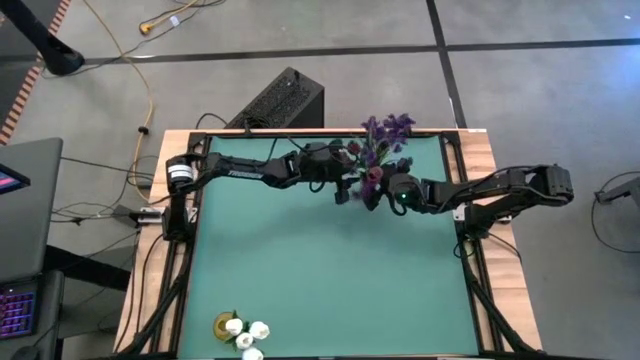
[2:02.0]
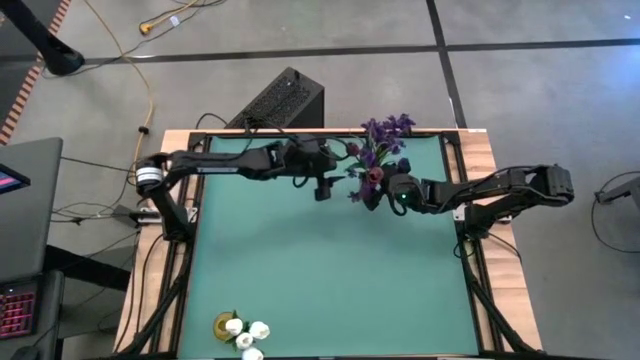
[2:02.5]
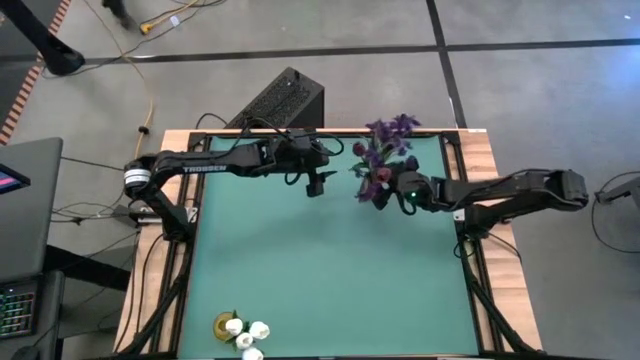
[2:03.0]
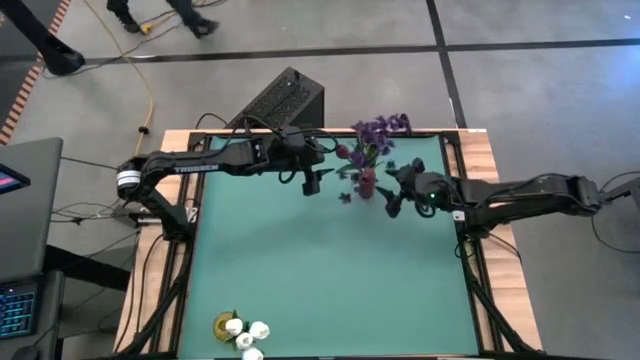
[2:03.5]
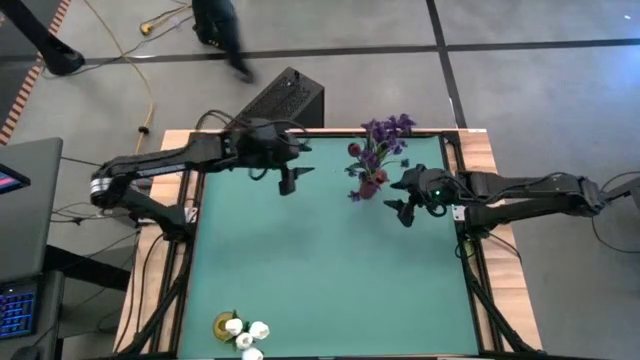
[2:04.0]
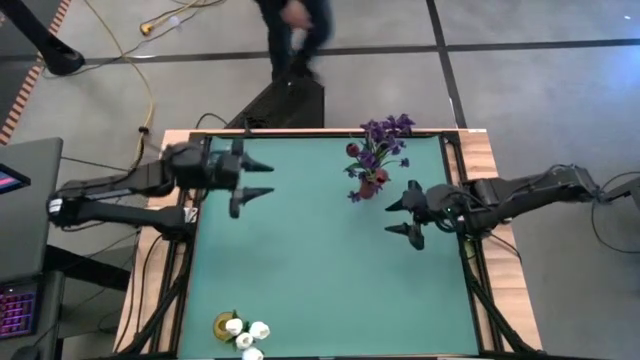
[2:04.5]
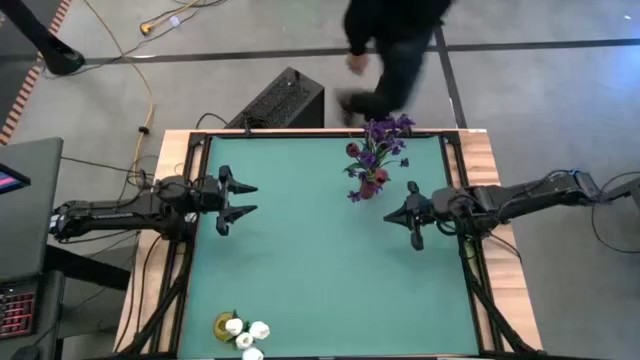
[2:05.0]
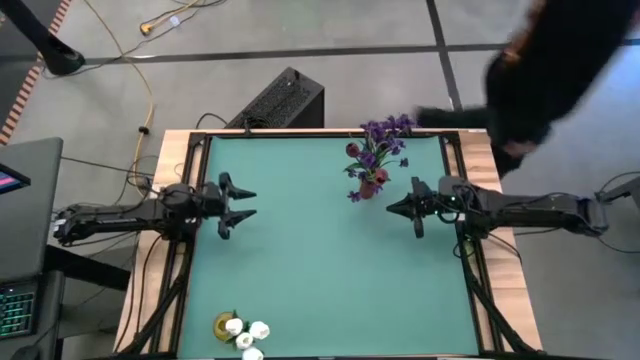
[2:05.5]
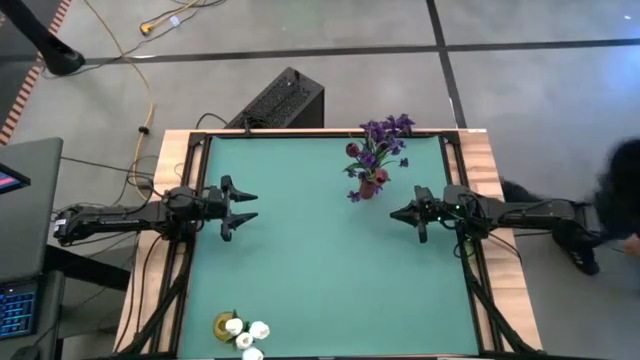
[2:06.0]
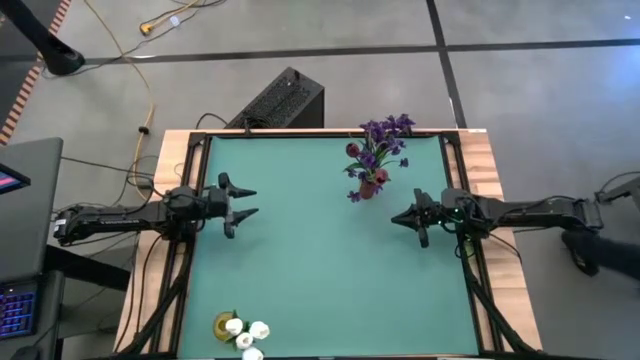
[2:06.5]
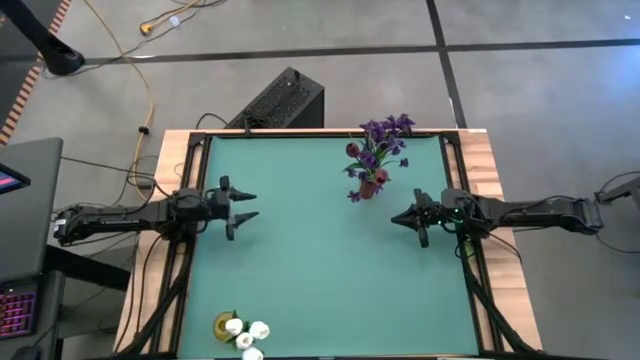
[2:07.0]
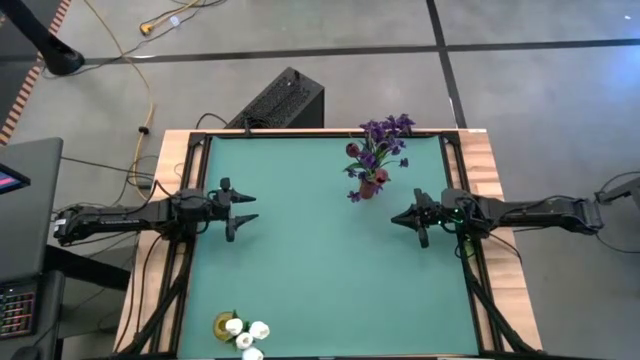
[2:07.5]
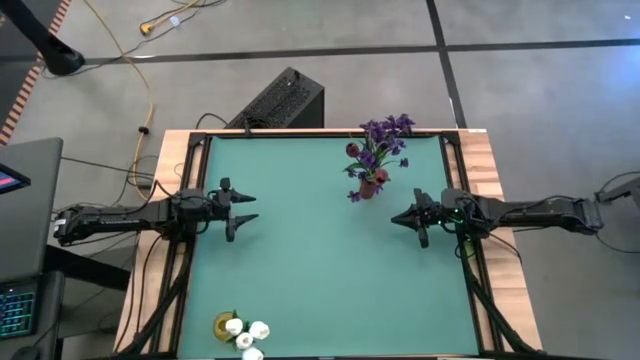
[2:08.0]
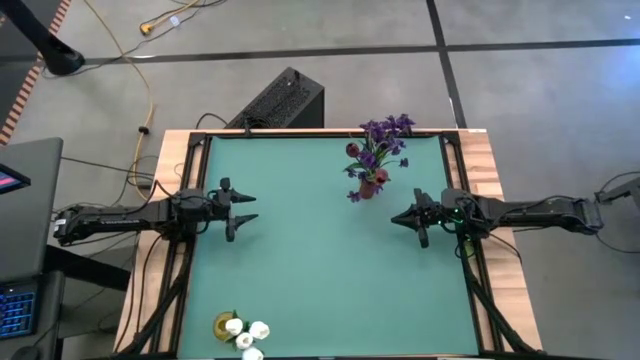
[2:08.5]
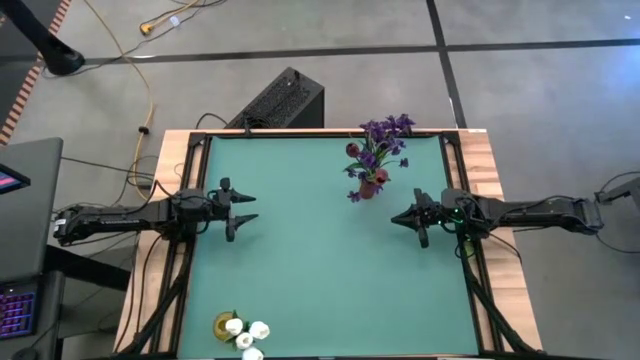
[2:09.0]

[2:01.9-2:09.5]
Task: Sort flowers into vase by color
Return to Home Position

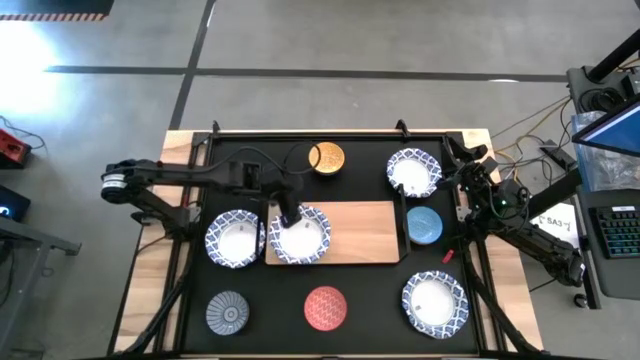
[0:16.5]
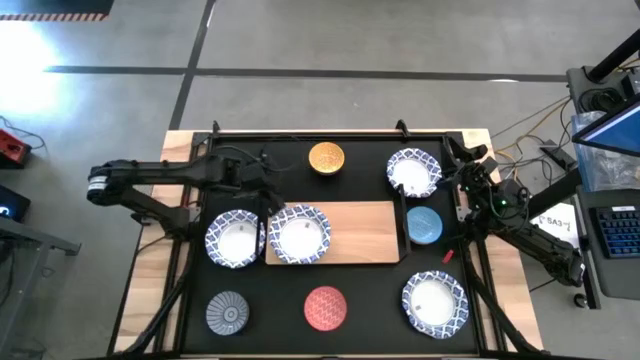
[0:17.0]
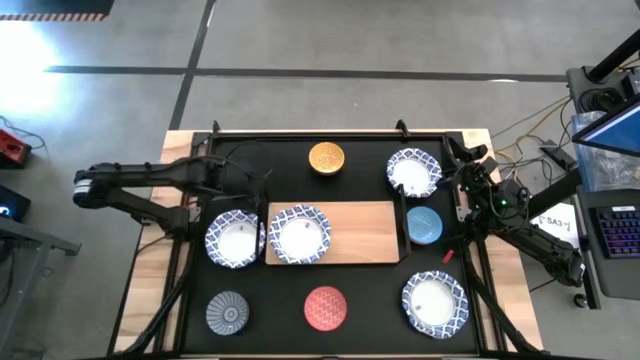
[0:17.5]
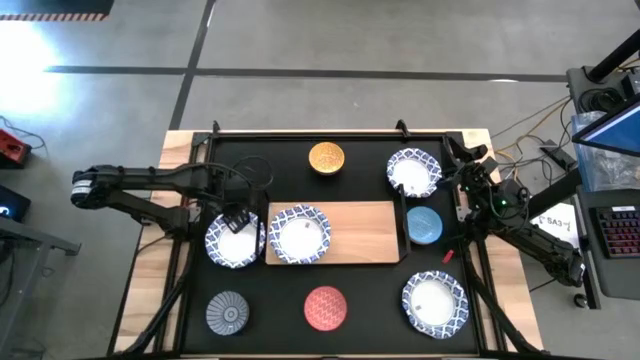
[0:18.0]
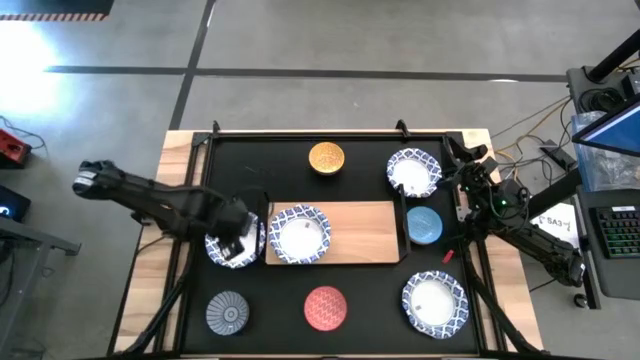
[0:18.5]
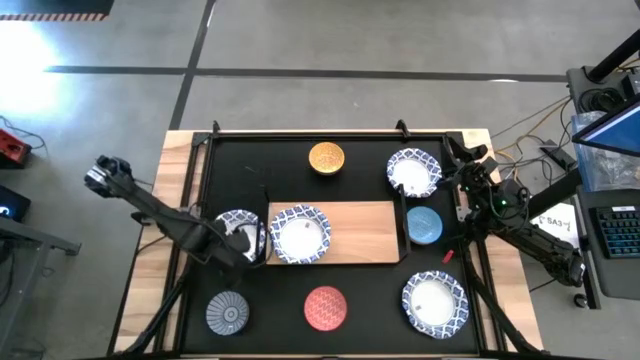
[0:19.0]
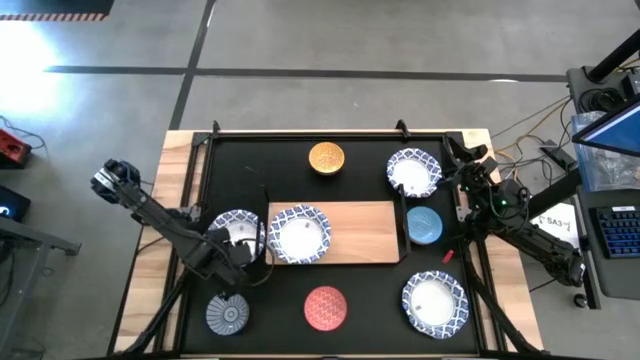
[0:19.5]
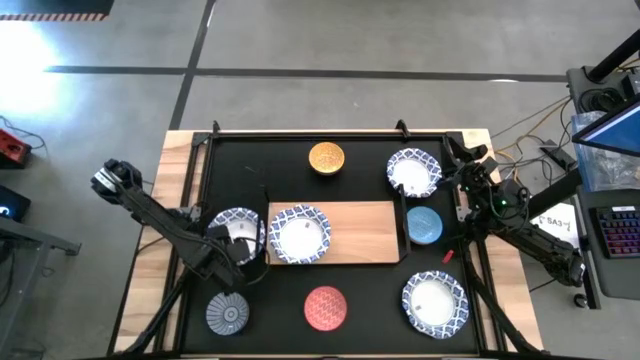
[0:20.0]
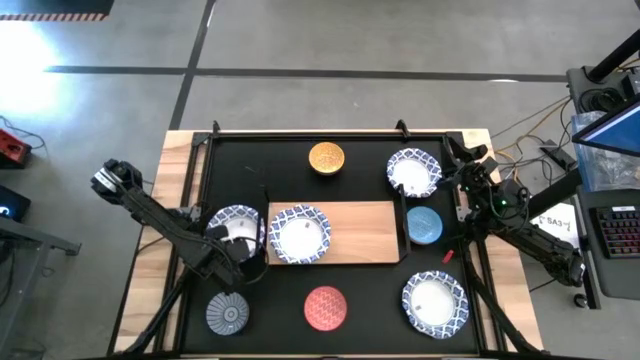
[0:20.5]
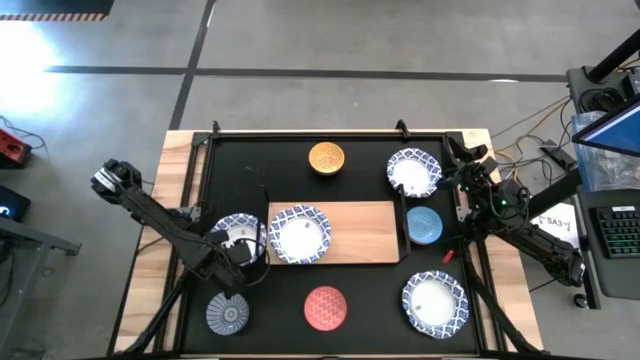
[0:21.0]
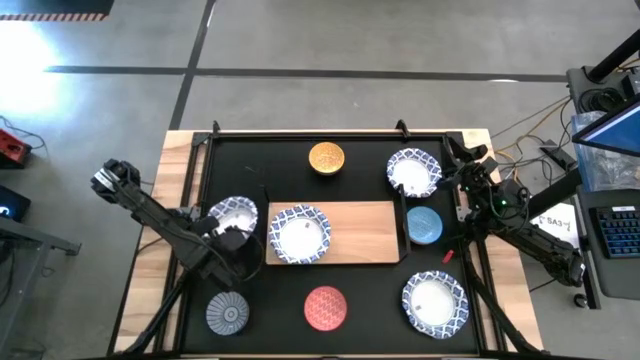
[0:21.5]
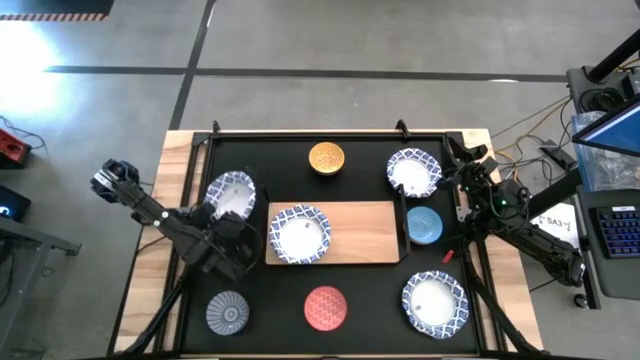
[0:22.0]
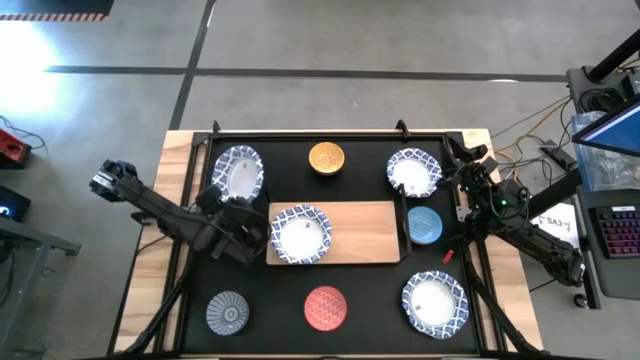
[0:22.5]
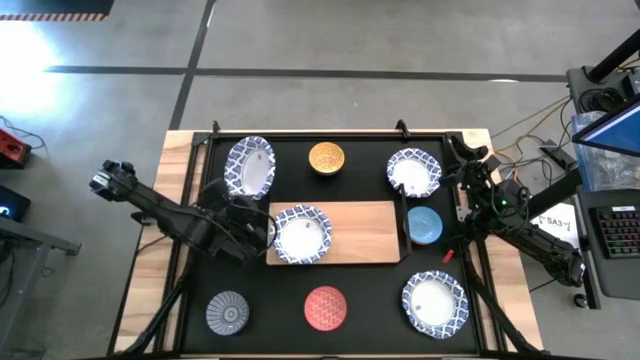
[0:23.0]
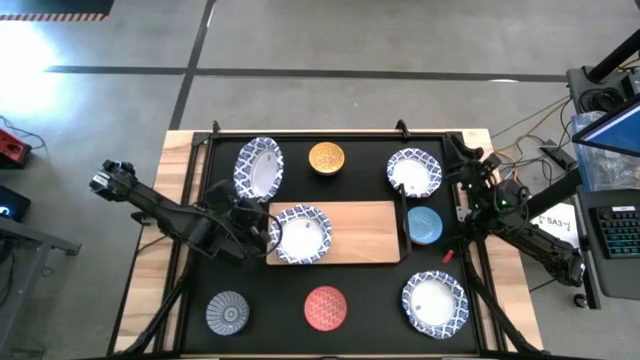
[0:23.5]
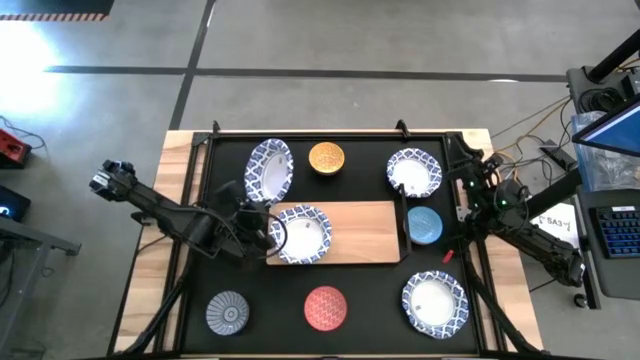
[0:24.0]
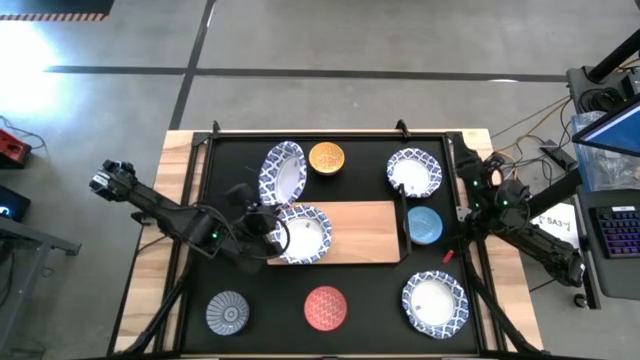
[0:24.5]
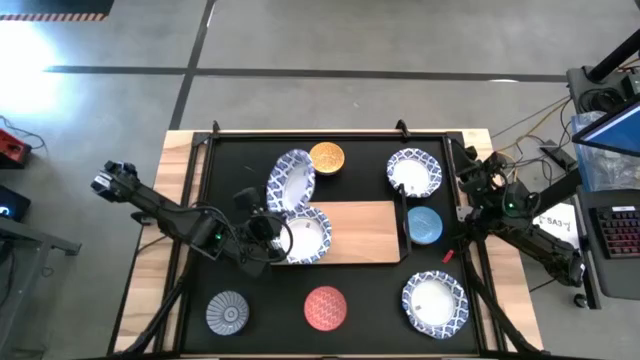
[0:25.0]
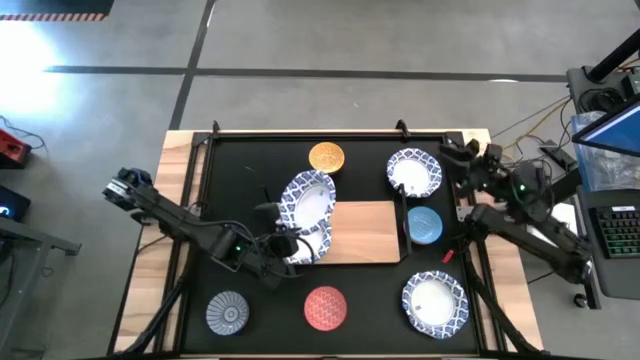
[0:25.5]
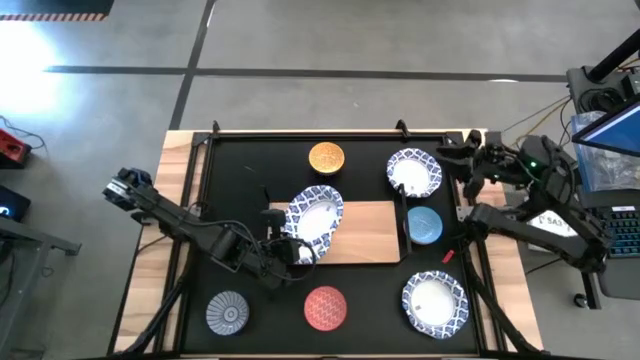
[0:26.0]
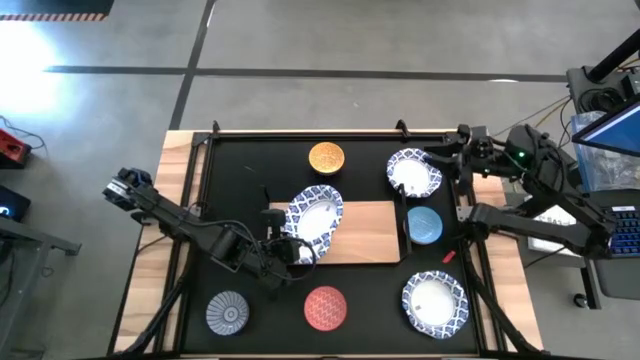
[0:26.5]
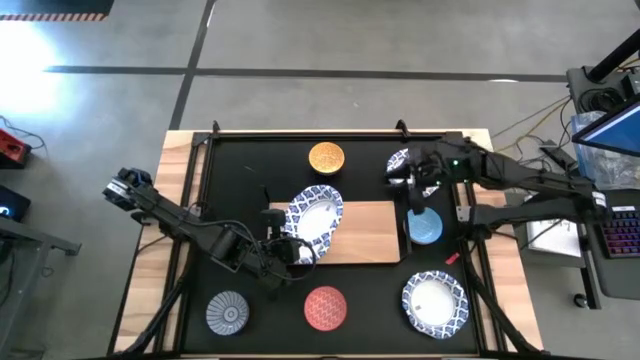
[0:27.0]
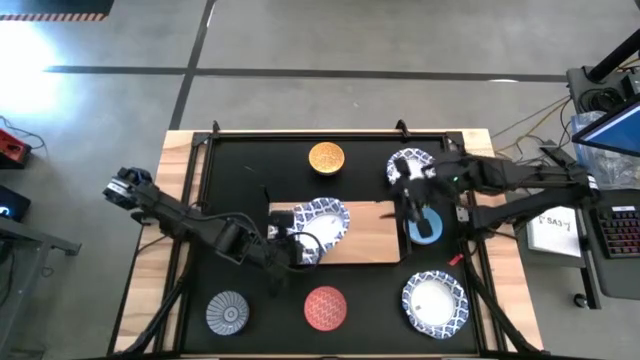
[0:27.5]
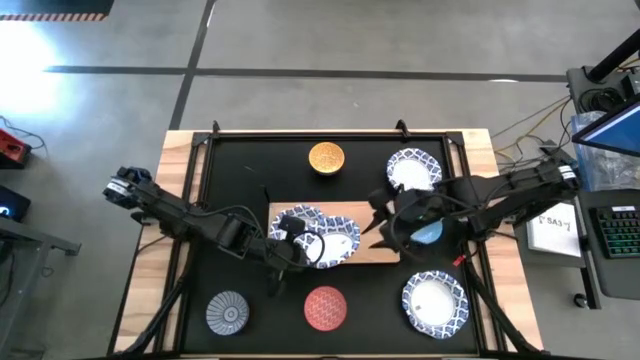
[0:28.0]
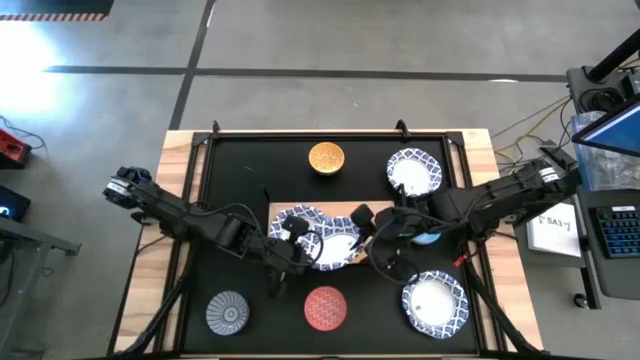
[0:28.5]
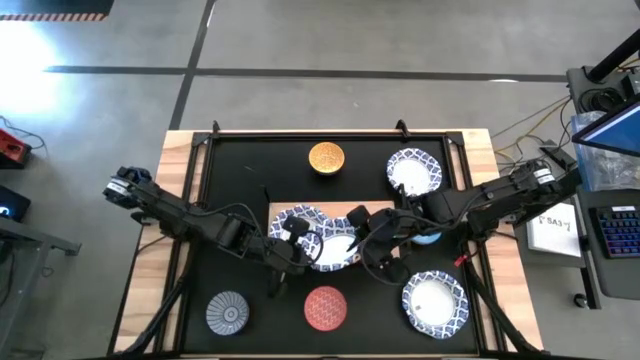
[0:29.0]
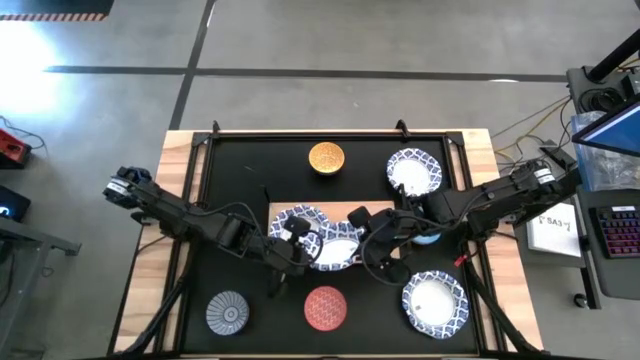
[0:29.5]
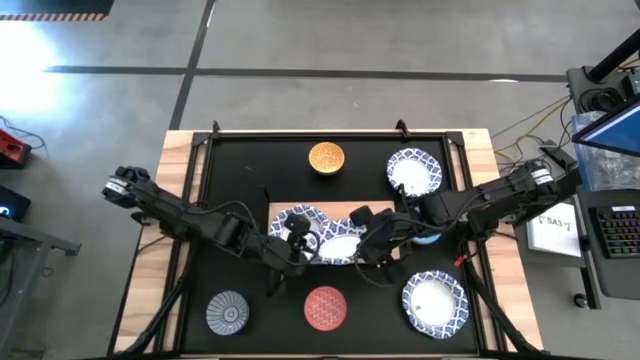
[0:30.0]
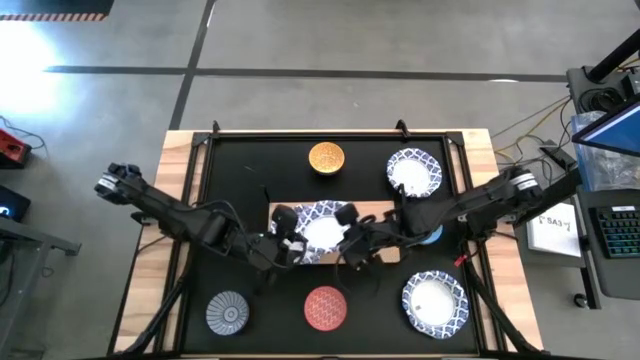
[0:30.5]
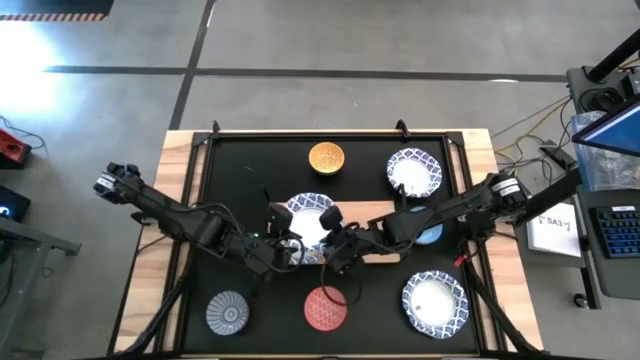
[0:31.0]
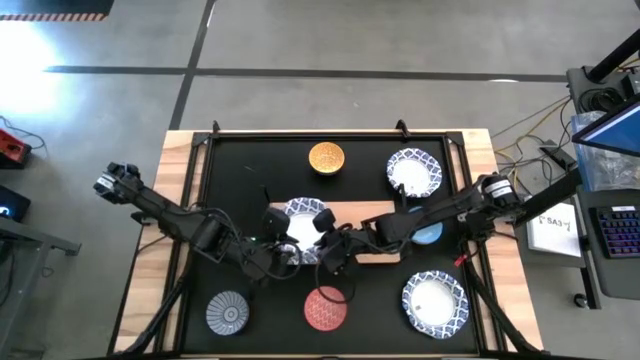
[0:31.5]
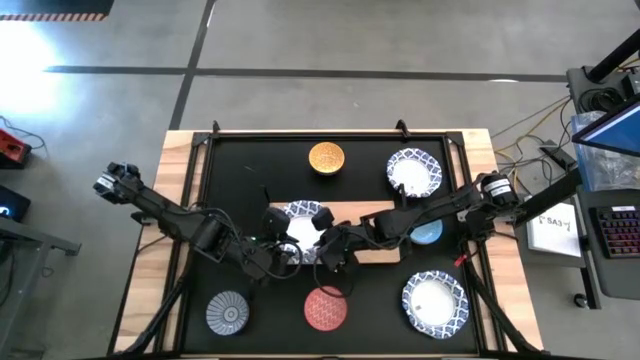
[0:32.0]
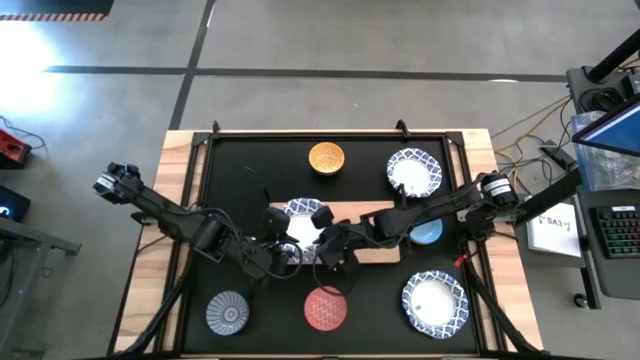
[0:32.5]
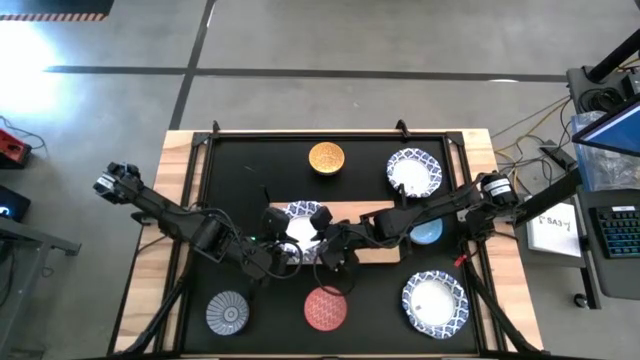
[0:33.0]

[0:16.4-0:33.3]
Task: Place and stack bowls onto a shelf
Stack the middle left white patterned bowl on top of the other white patterned bowl on the shelf
